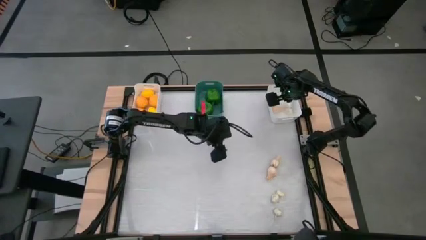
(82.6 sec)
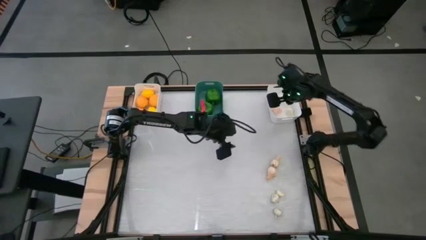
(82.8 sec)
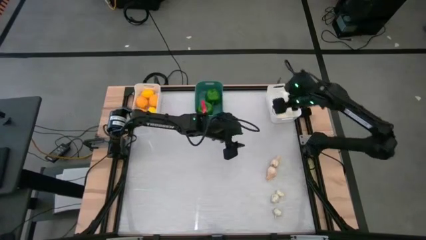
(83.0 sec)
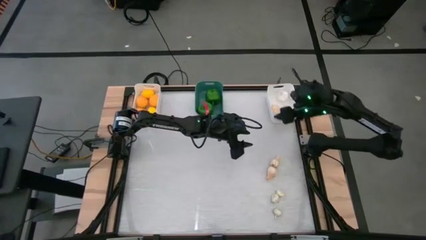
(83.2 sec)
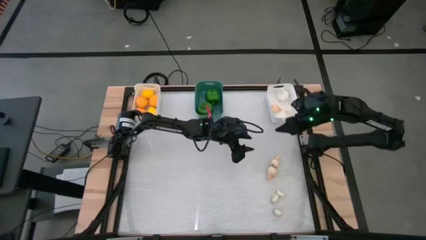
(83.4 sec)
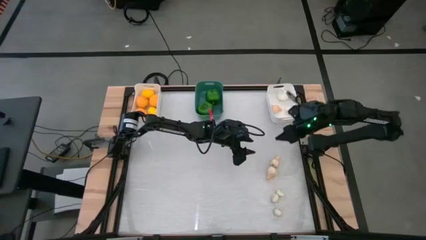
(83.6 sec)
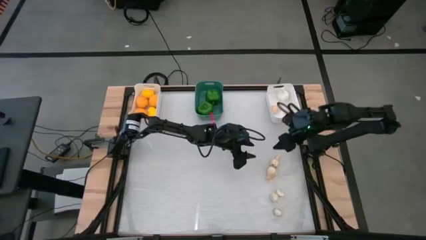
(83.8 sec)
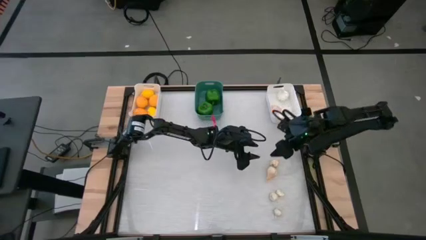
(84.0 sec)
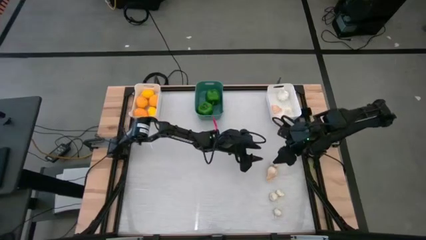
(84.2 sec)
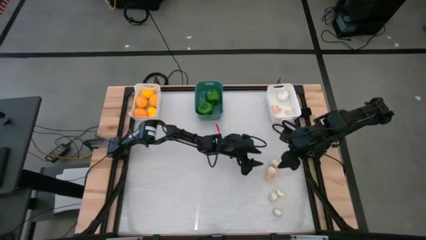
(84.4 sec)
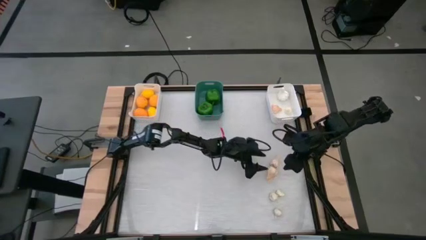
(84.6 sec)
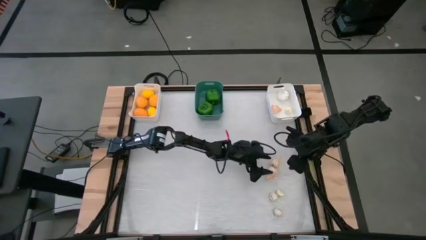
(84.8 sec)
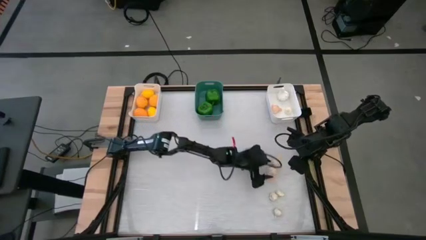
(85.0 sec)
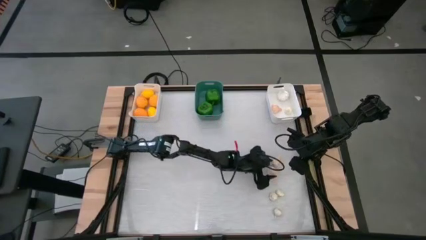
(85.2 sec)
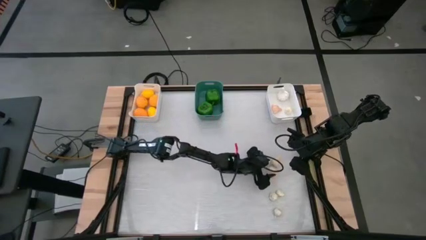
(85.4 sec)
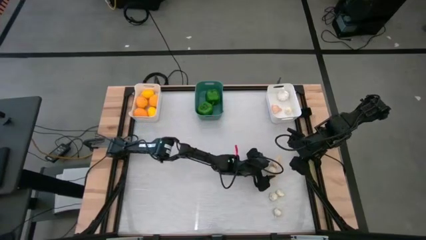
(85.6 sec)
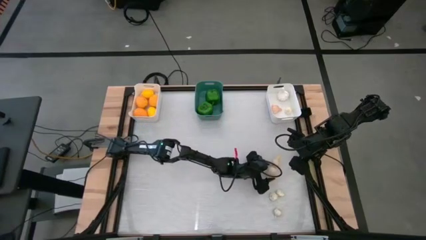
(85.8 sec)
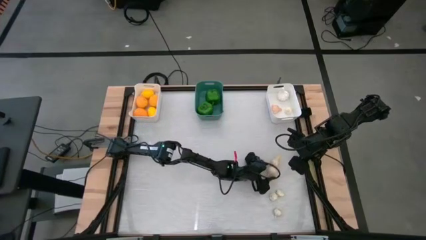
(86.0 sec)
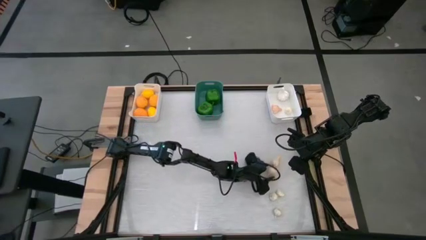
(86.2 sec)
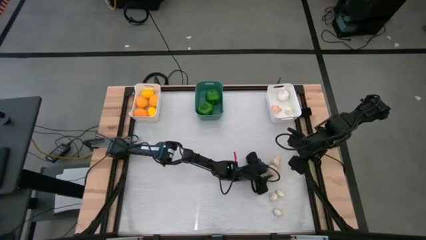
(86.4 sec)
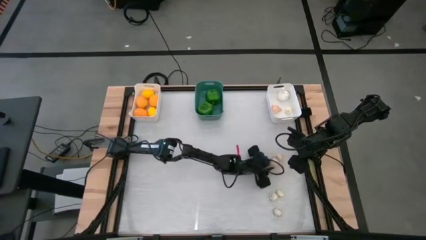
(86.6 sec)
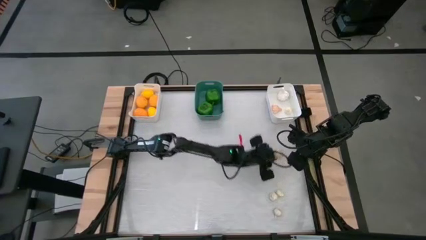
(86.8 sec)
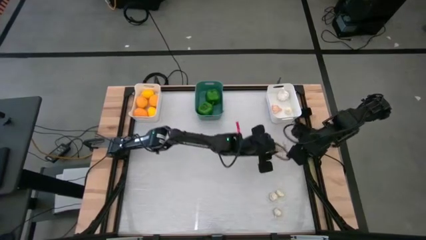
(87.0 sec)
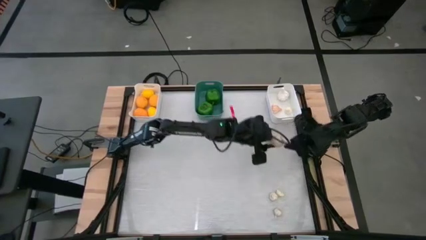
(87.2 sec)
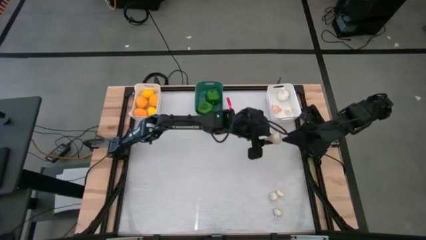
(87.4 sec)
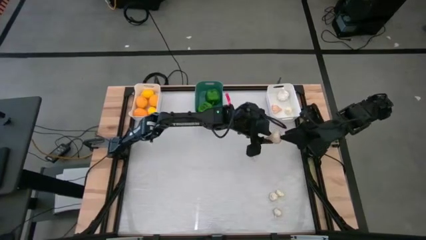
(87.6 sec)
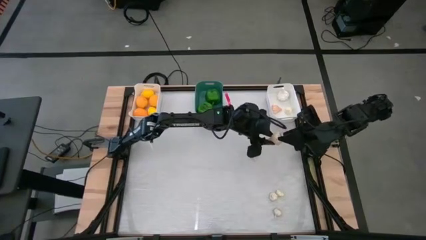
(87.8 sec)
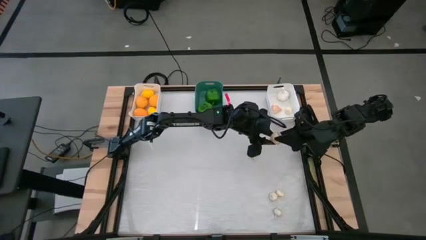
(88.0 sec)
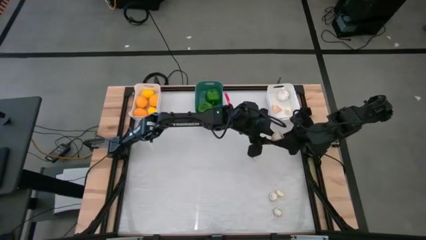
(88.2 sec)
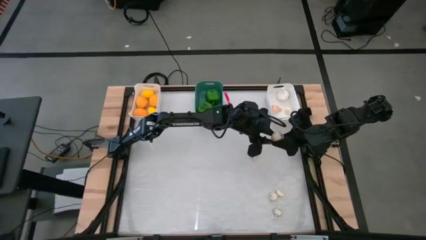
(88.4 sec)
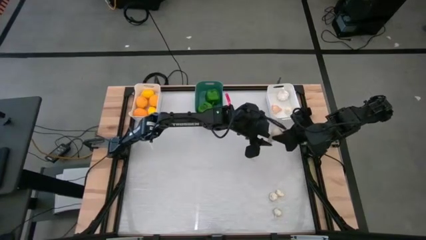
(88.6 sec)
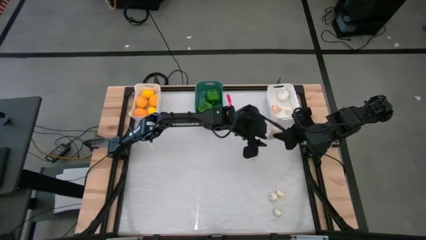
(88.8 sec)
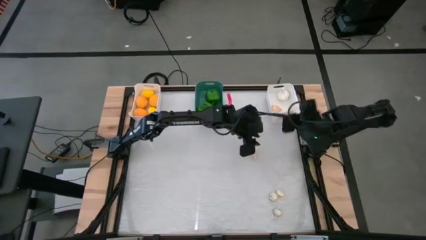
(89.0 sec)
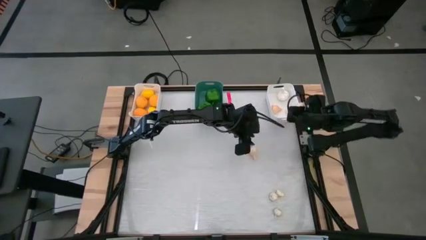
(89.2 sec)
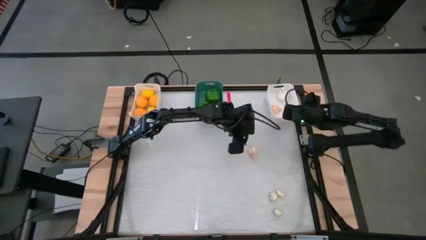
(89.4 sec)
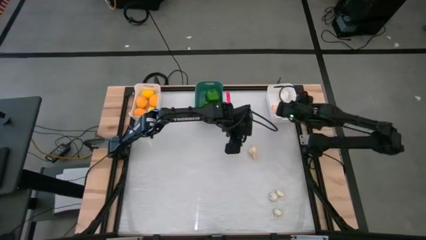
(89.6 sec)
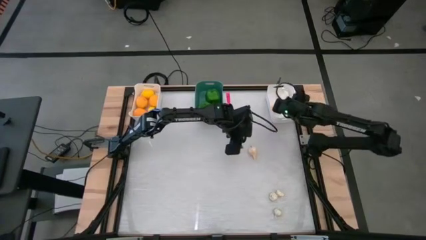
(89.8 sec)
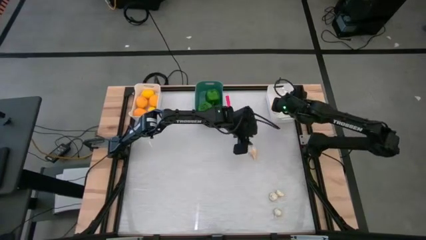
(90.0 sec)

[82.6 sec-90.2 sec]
Task: Sort produce into baskets
Put the middle right white garlic into the right white bin

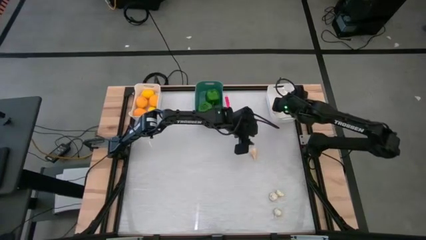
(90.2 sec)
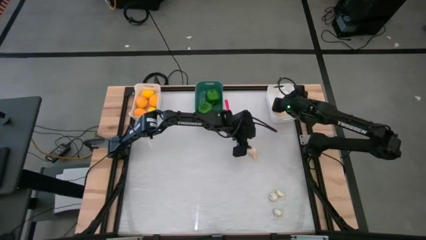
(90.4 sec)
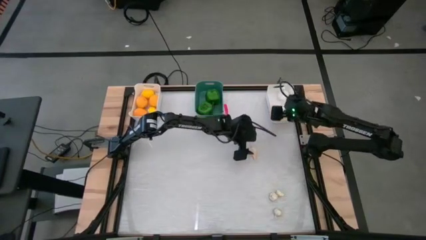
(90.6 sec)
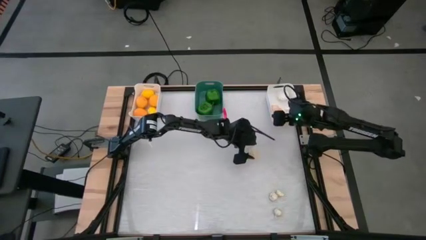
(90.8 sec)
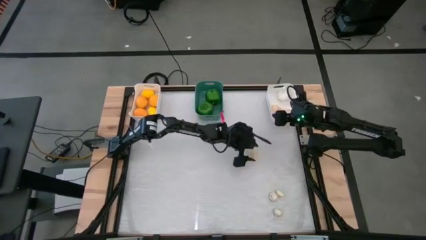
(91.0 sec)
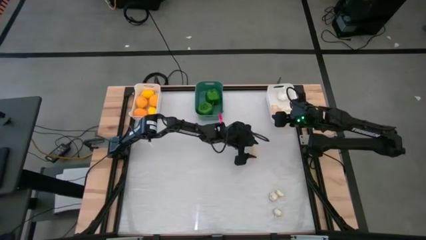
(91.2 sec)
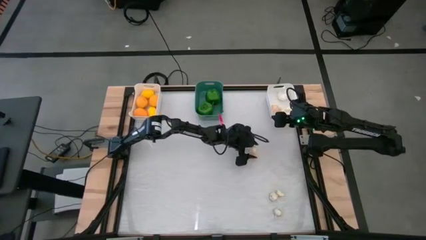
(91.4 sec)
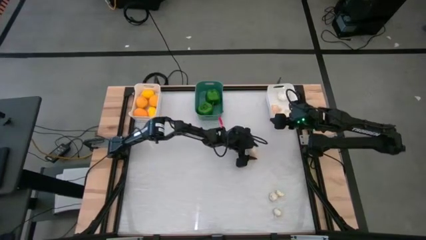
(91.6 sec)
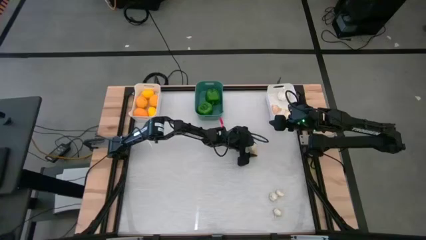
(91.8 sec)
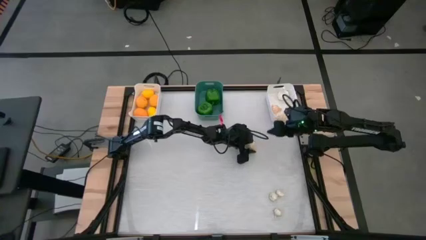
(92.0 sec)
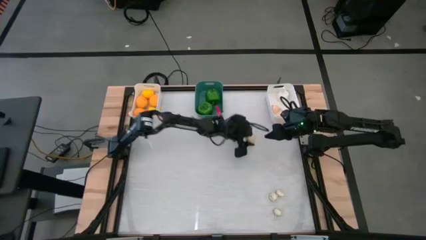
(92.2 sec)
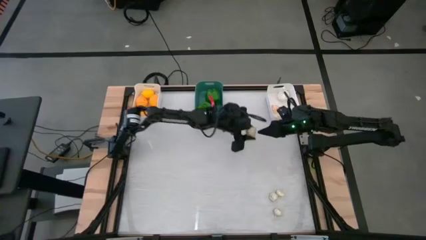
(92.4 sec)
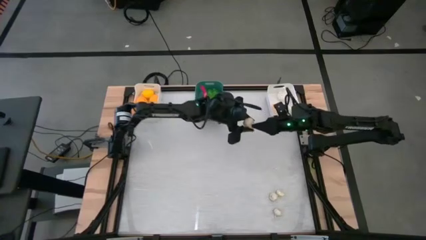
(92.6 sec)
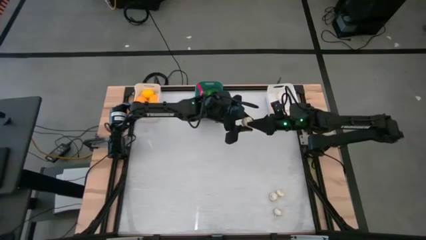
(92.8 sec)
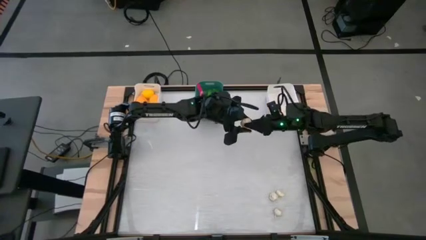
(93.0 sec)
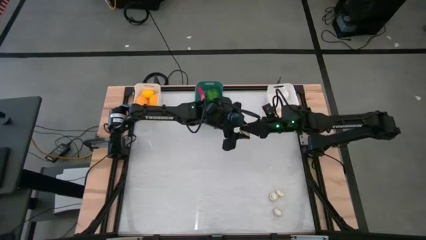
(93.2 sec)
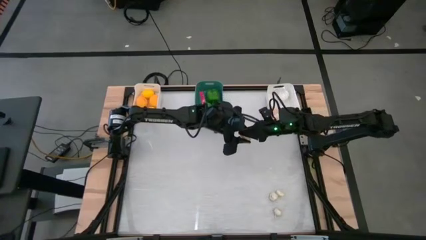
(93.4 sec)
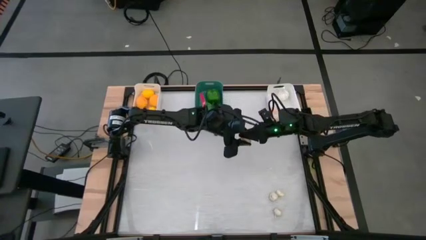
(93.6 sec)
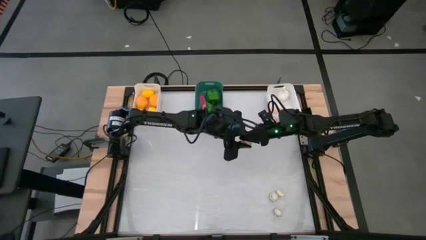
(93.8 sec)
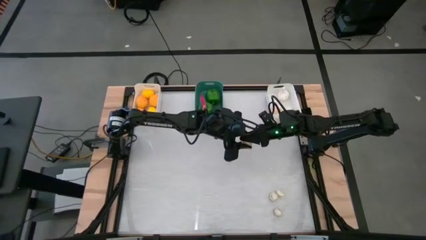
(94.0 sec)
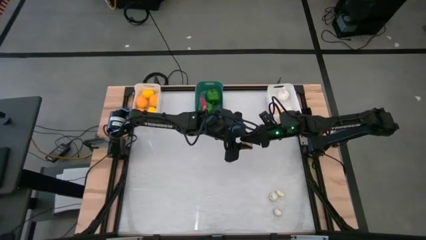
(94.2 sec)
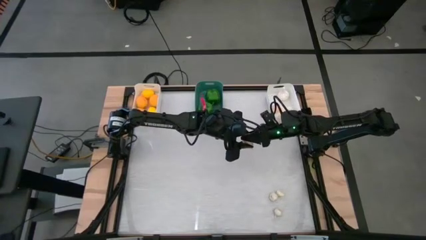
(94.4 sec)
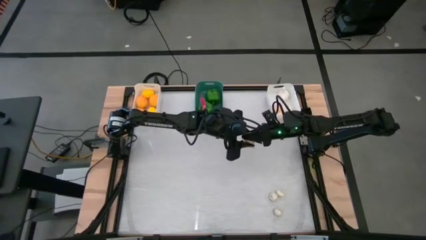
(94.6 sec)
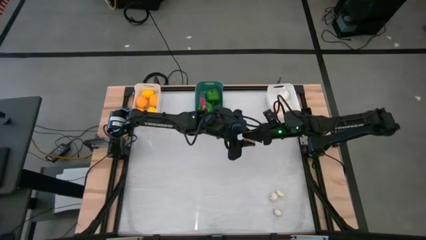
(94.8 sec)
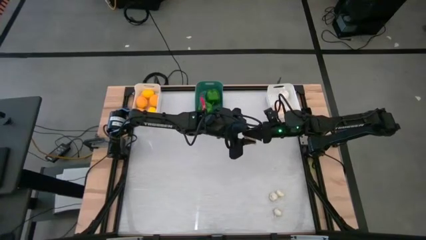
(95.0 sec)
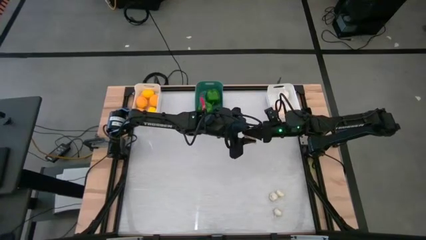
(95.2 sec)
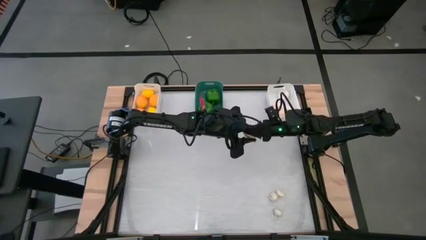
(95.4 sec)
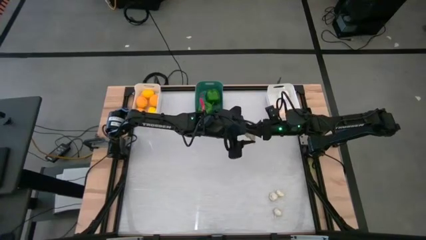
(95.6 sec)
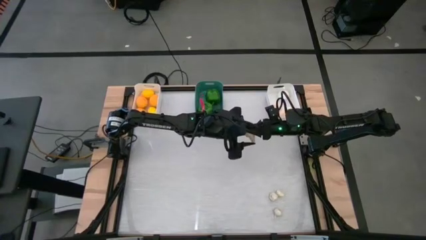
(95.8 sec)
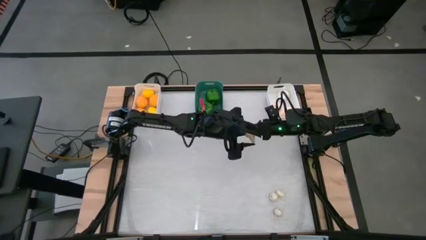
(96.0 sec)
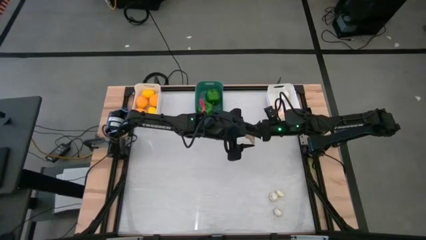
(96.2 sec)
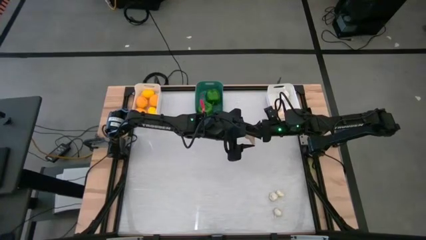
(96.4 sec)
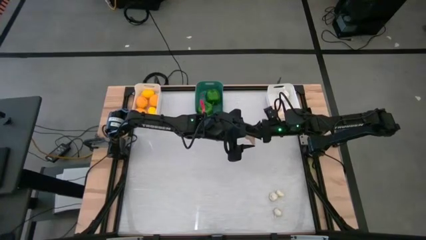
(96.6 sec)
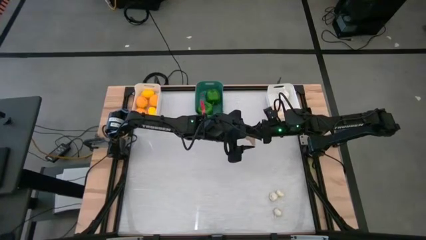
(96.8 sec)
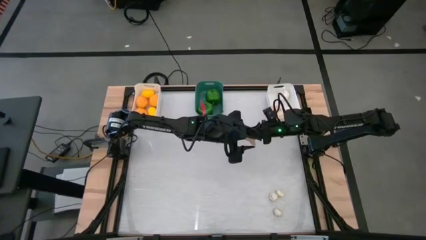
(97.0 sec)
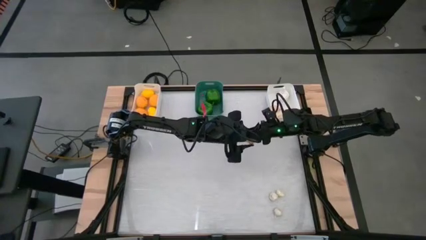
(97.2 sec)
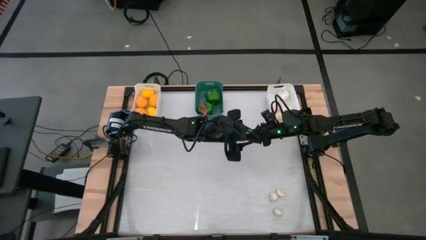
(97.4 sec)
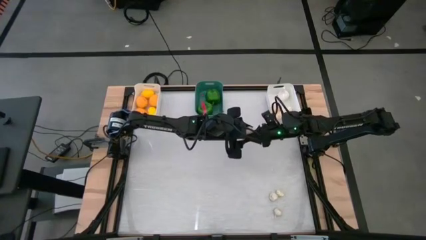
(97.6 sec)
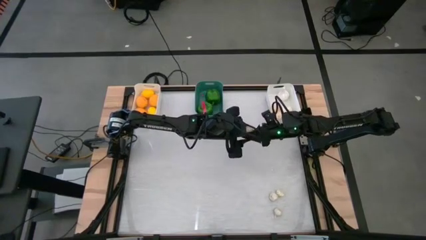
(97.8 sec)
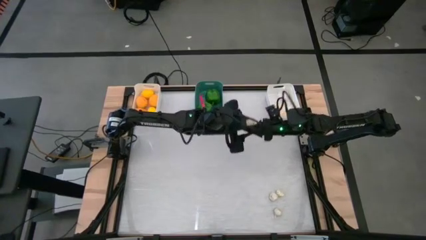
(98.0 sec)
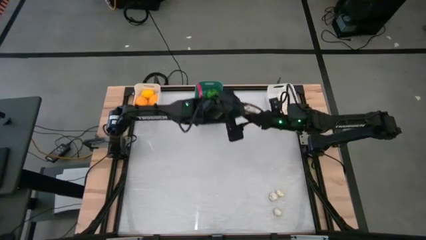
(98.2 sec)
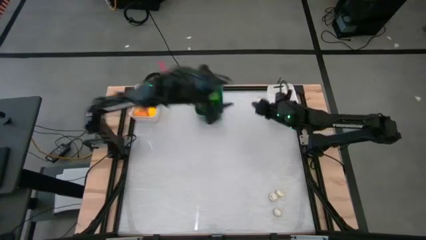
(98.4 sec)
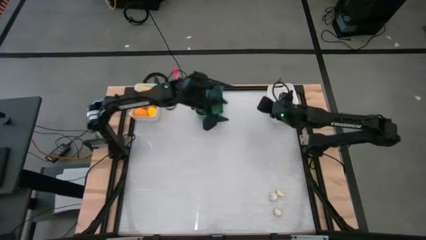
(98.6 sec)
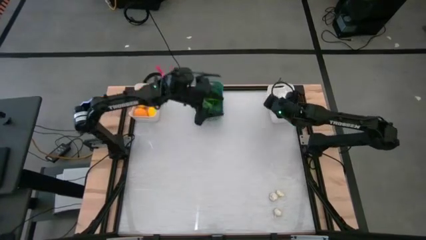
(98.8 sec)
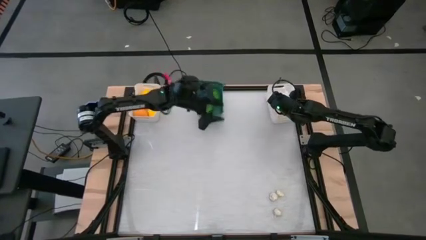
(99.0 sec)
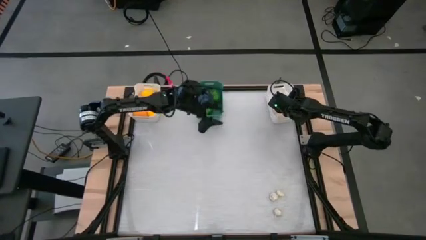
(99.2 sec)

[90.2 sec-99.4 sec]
Put the top white garlic into the right white bin
